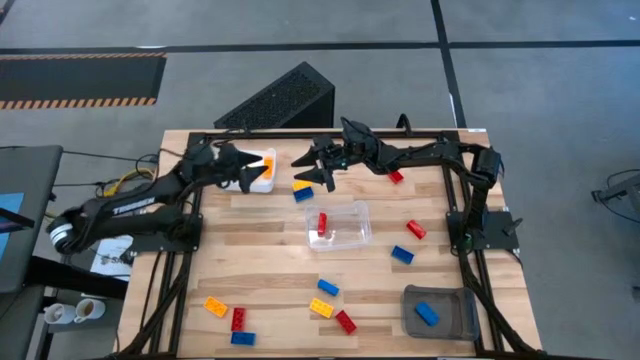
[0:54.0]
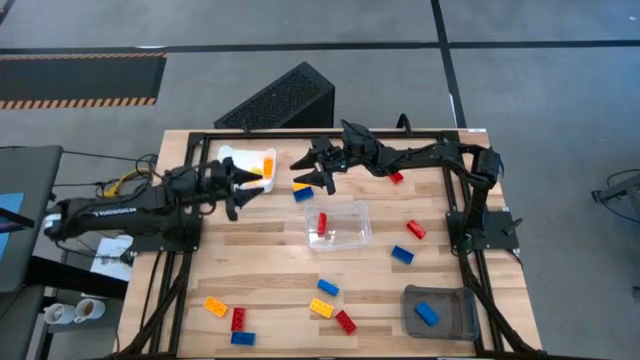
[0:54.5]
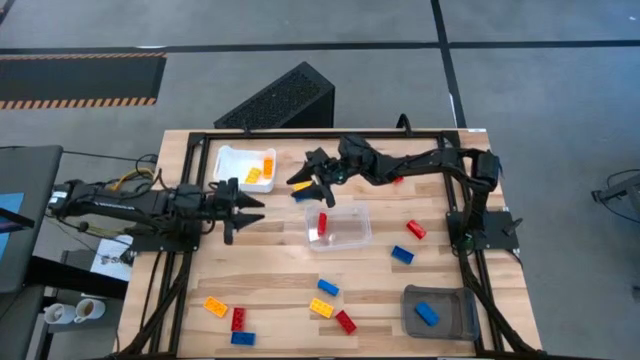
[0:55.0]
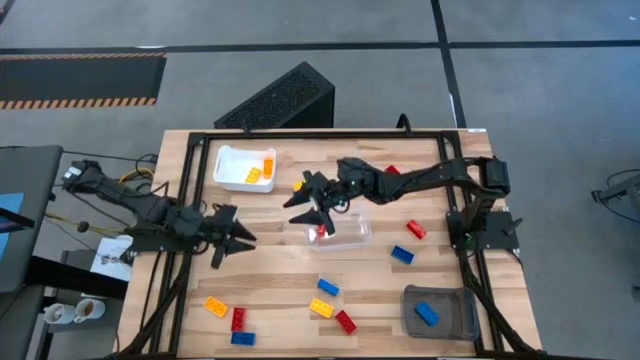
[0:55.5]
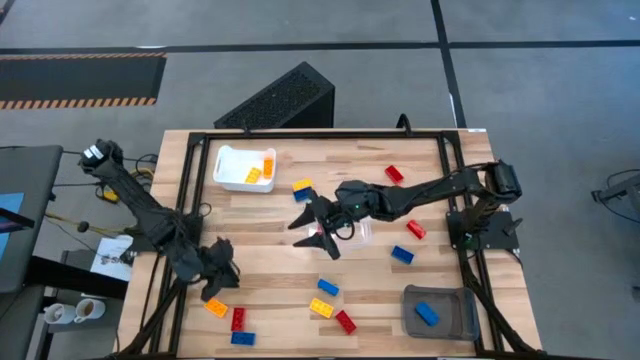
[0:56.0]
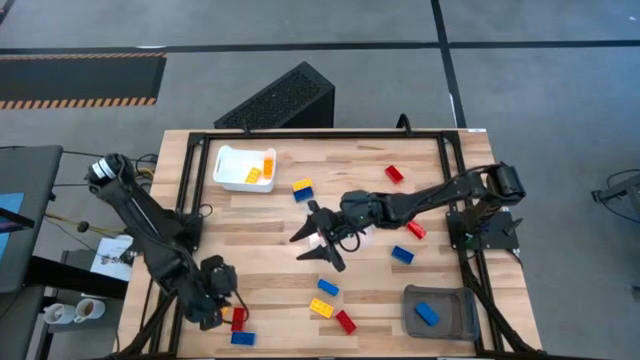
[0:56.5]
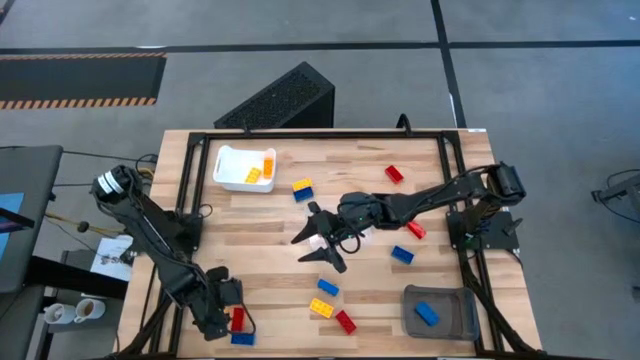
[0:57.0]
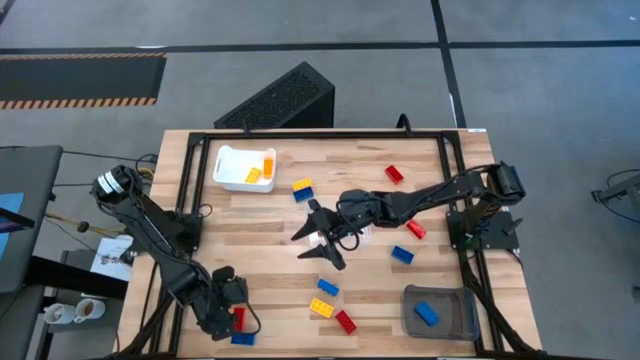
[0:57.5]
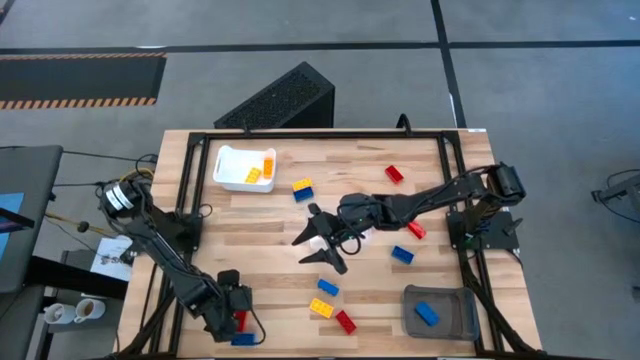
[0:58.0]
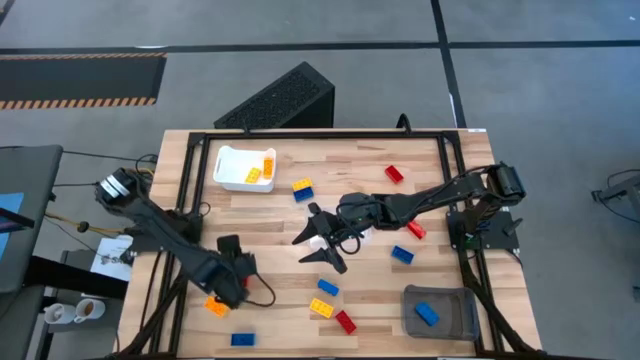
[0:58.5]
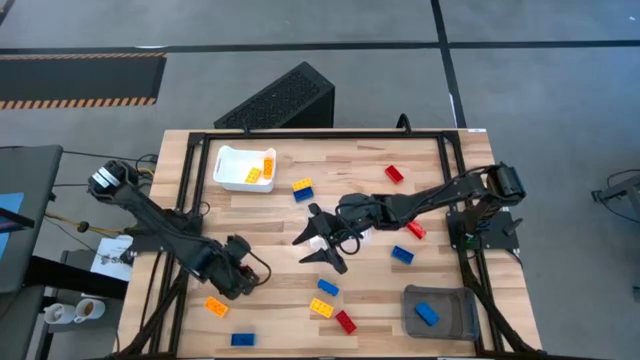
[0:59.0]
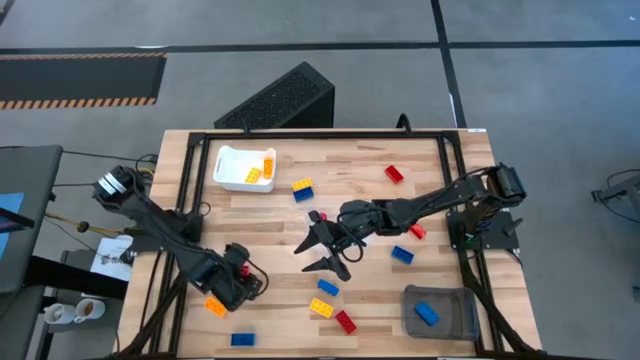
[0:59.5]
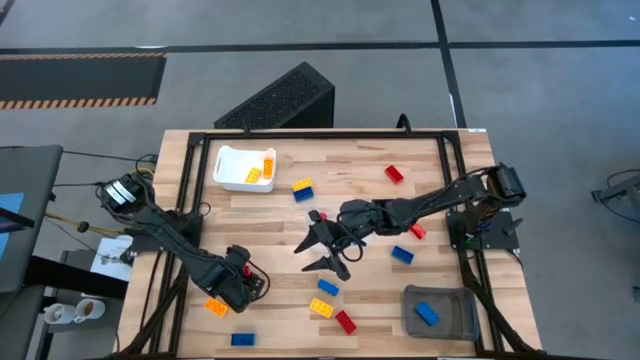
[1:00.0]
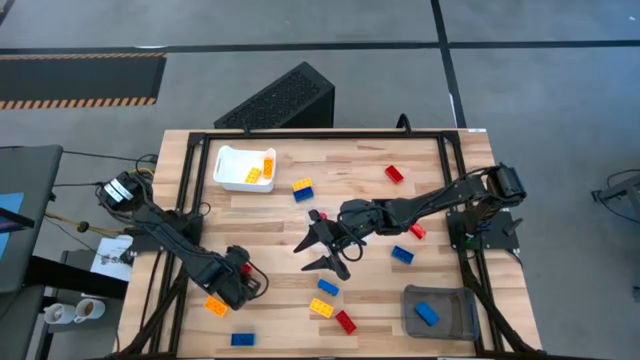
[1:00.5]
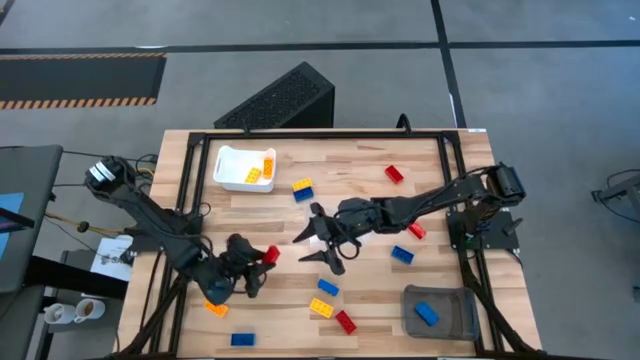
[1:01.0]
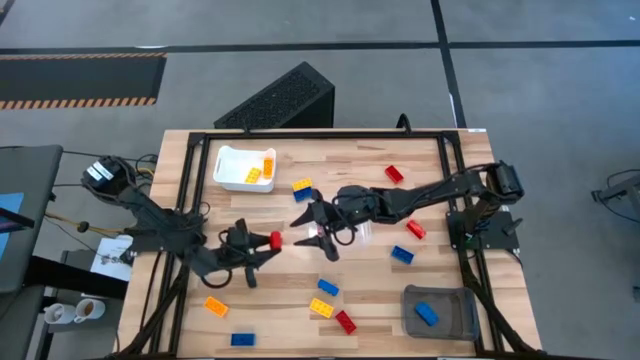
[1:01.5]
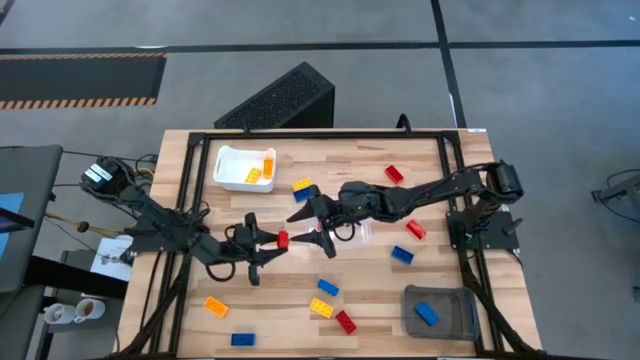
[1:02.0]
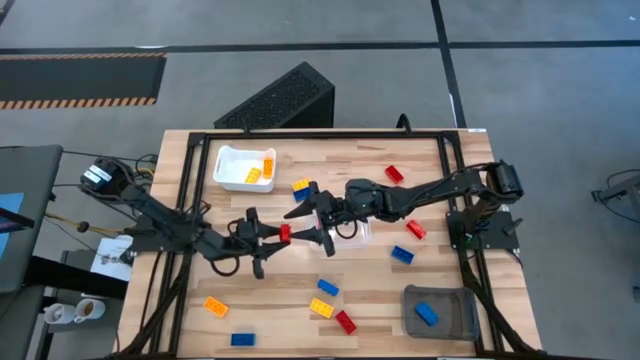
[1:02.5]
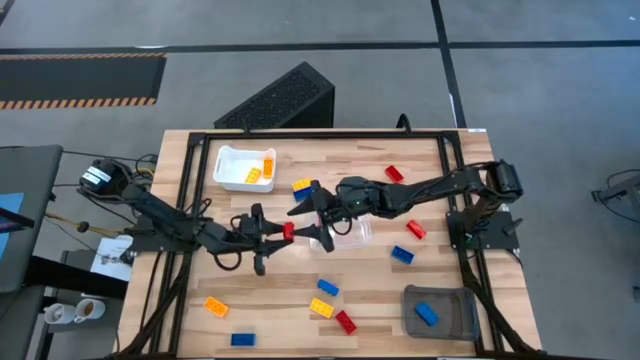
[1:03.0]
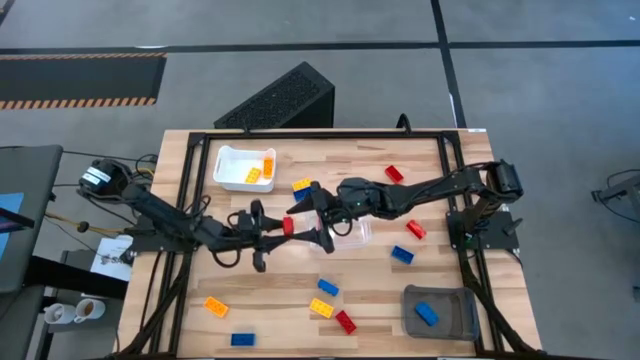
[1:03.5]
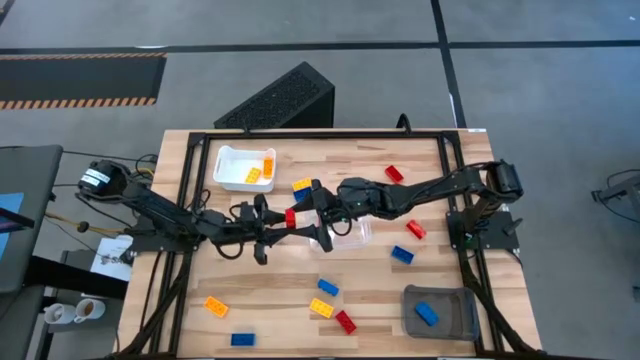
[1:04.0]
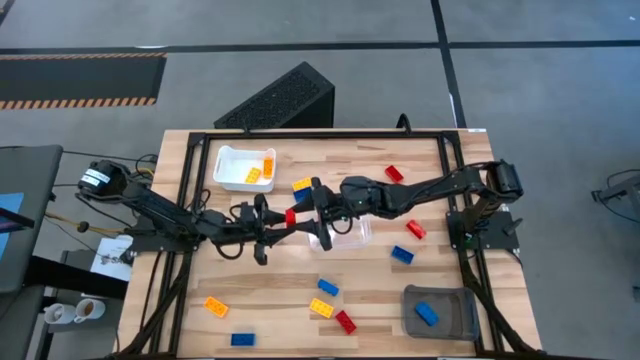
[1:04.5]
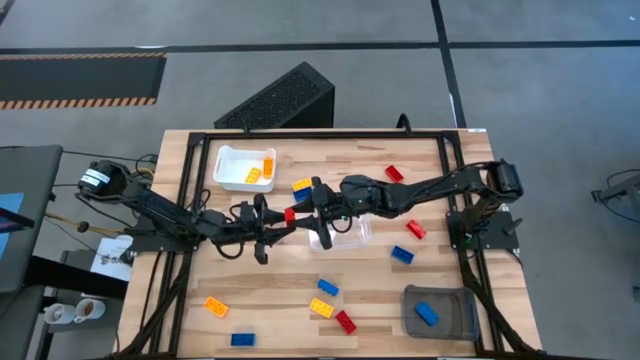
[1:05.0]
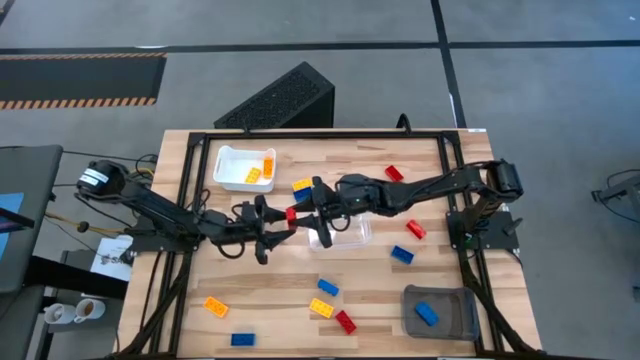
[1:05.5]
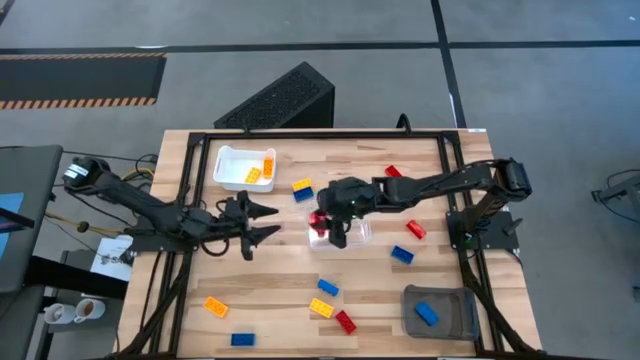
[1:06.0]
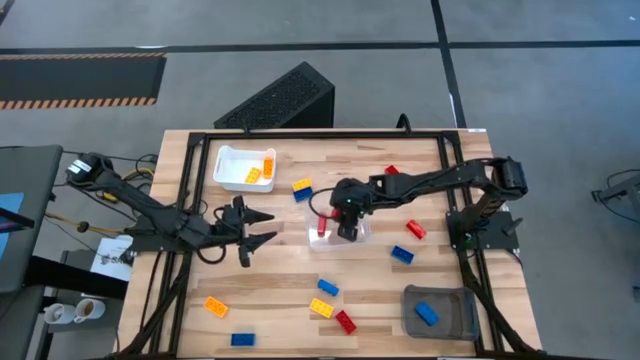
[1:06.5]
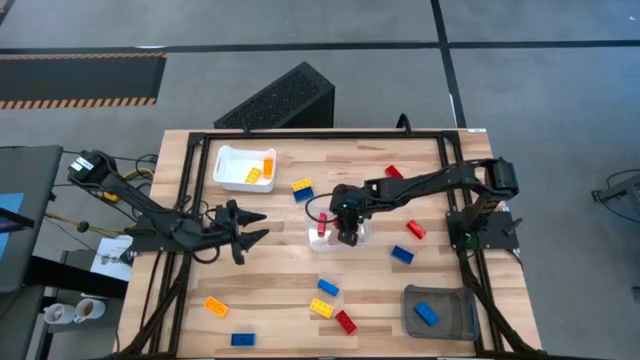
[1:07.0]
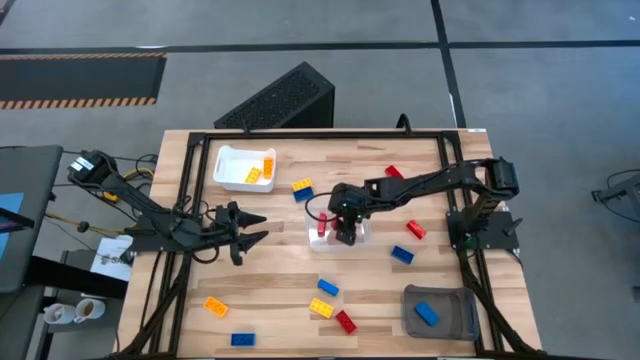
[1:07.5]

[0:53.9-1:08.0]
Task: Sort & place blocks by color
Put the red game piece into the transparent bin

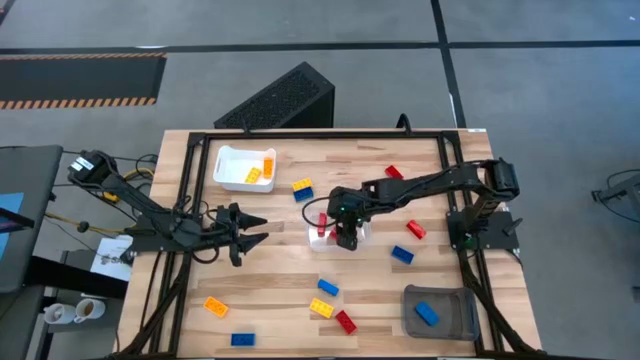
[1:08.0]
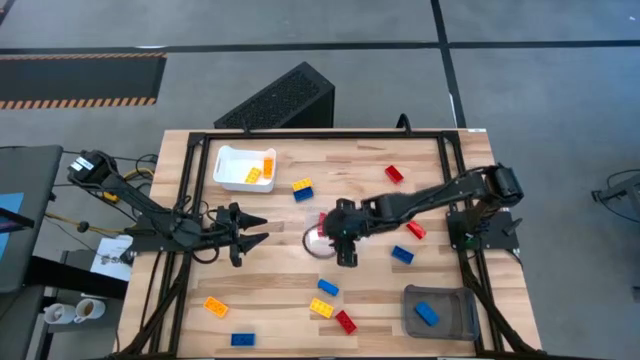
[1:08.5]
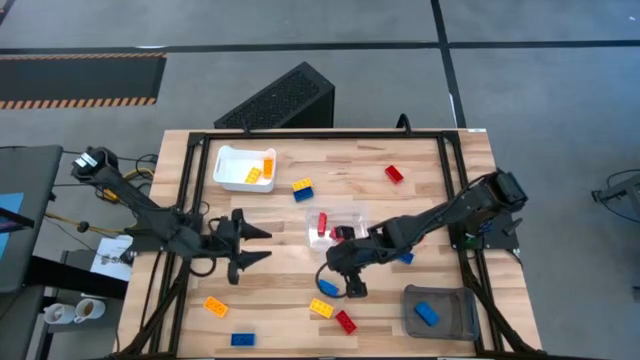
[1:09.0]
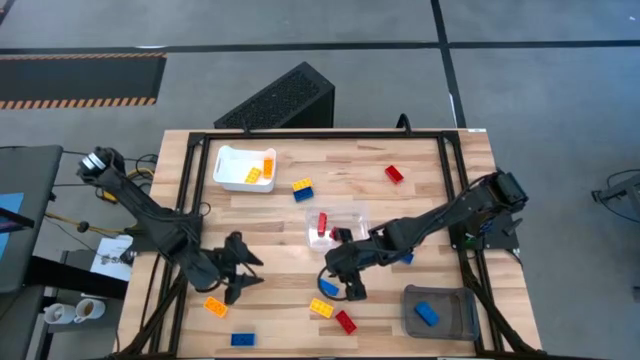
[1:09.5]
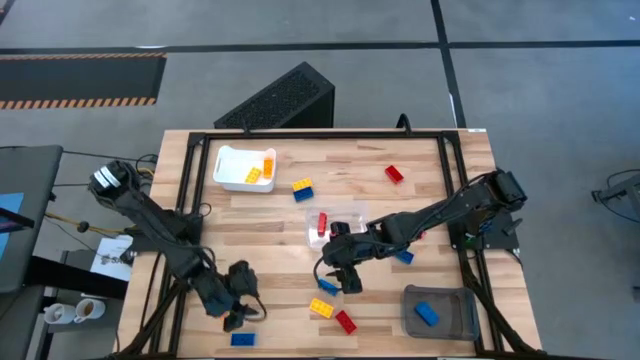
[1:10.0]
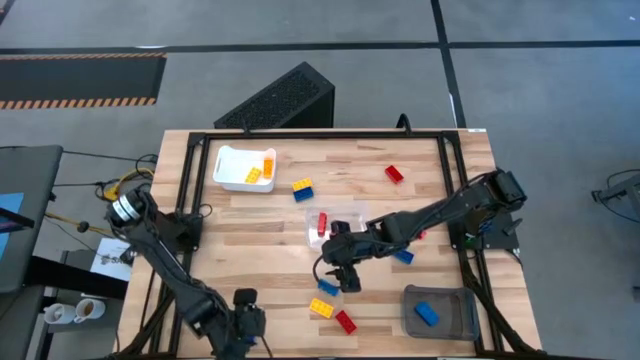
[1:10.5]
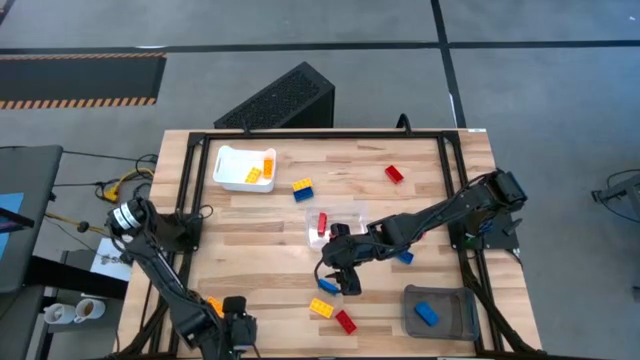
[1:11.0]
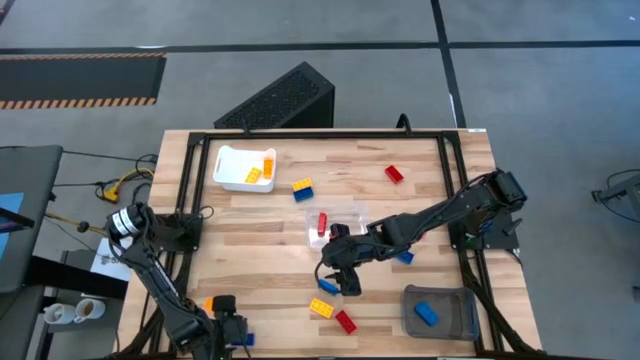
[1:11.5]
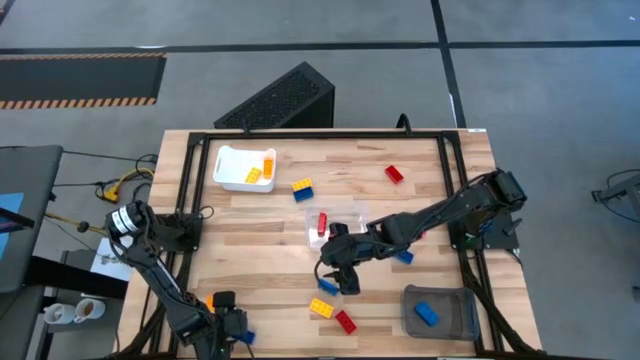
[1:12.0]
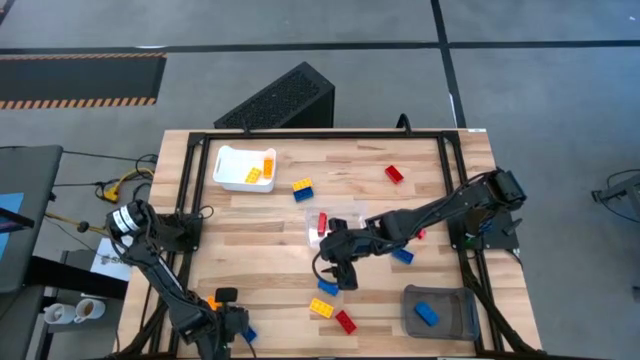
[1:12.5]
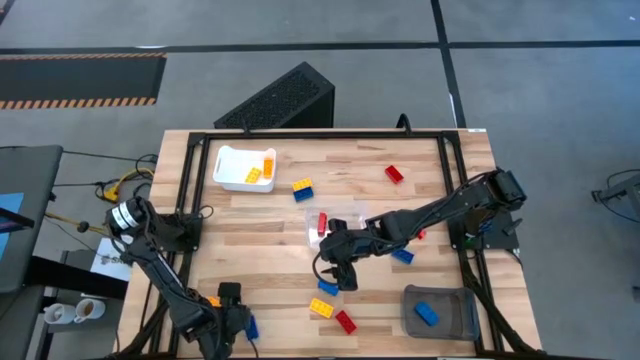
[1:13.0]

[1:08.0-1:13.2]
Put the blue game piece into the black bin

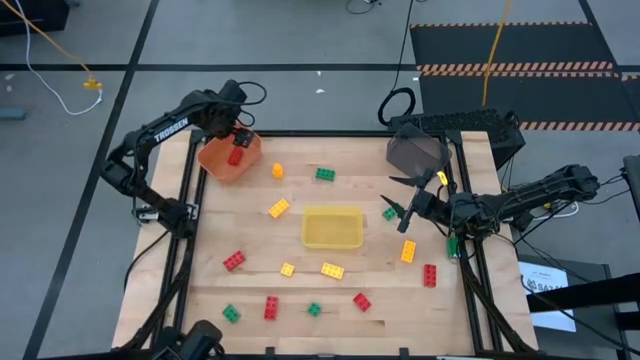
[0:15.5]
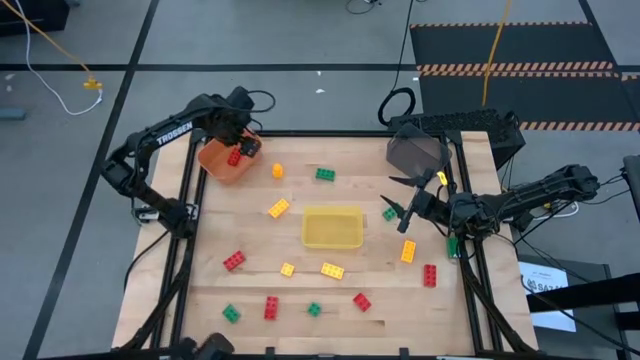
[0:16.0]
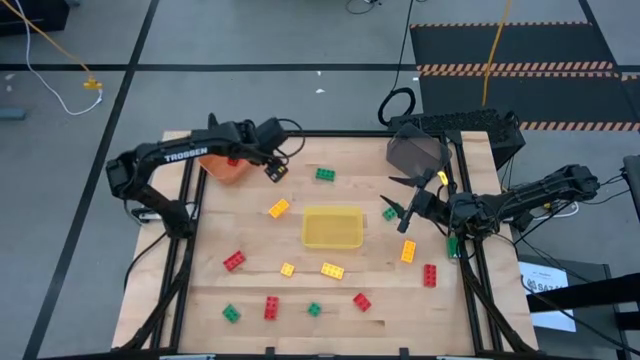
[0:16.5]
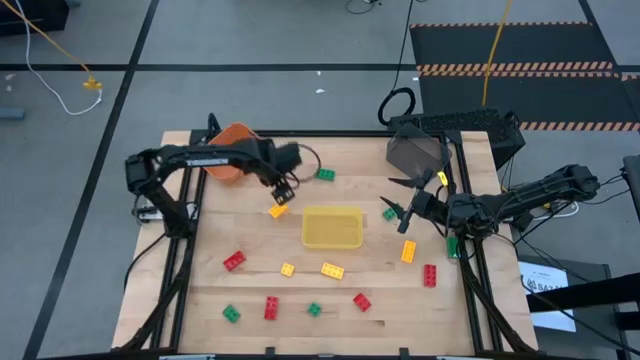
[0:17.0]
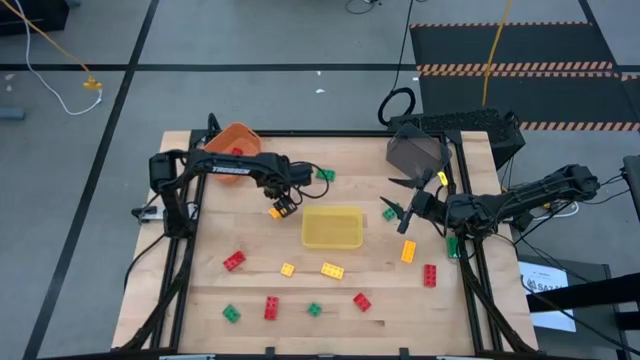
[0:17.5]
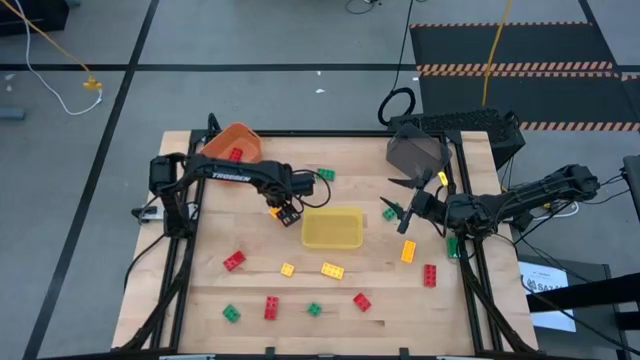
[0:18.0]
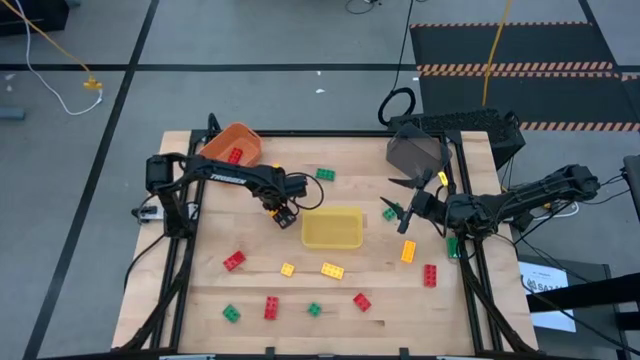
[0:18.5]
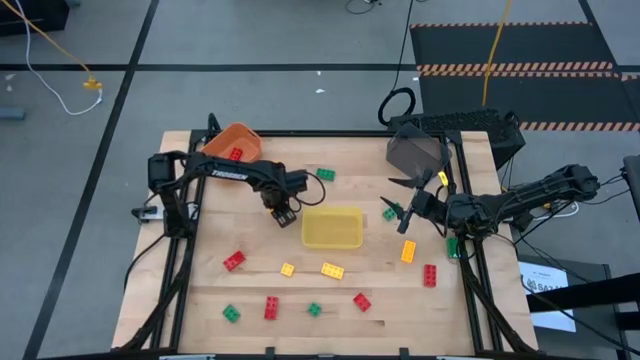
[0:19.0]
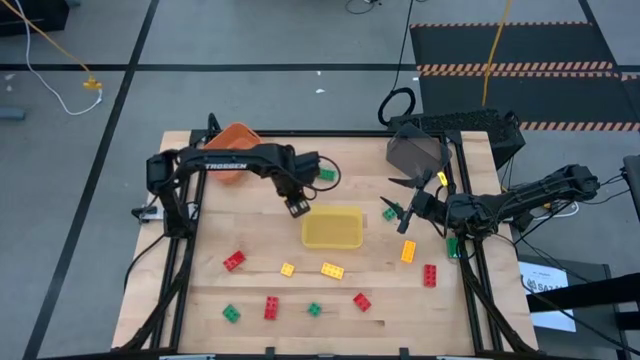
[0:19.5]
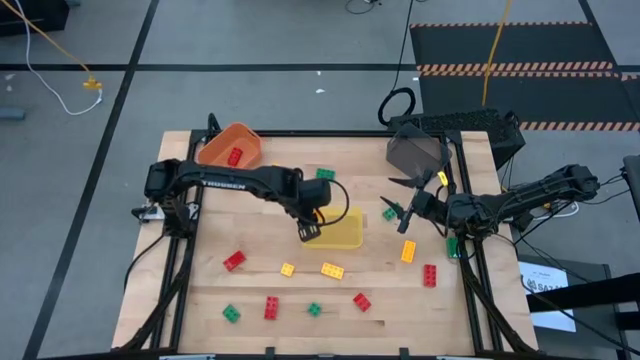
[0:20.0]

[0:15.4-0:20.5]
Task: Sort & place blocks by color
Put the middle left yellow 8-stud game piece into the yellow bin
